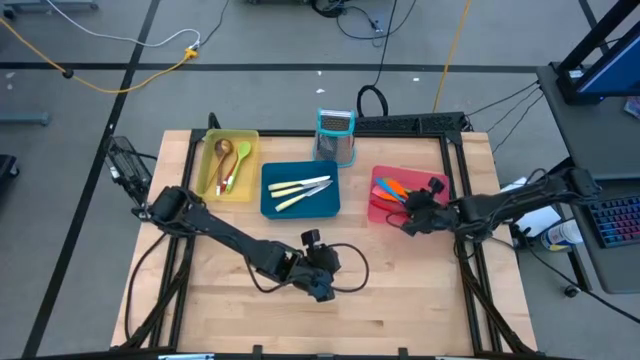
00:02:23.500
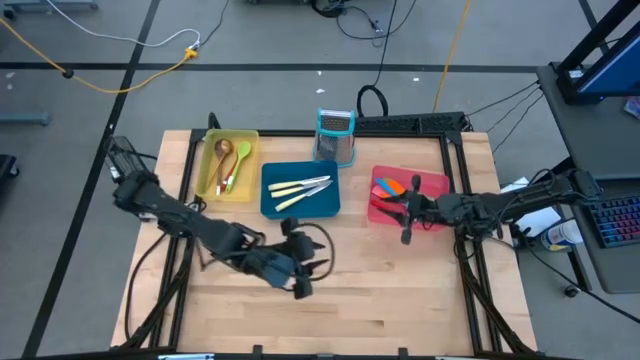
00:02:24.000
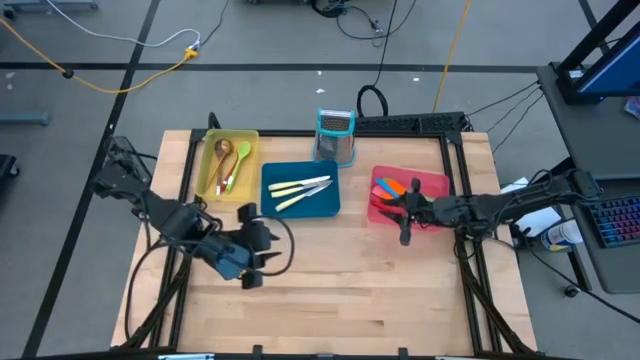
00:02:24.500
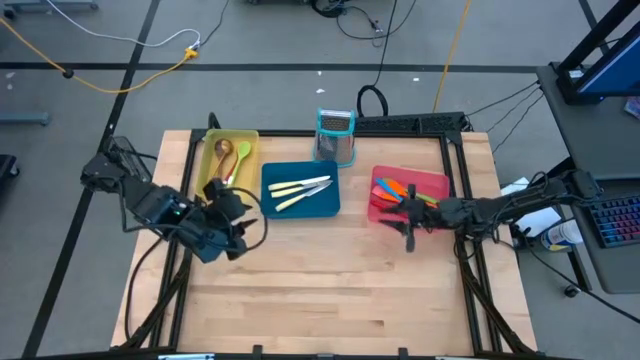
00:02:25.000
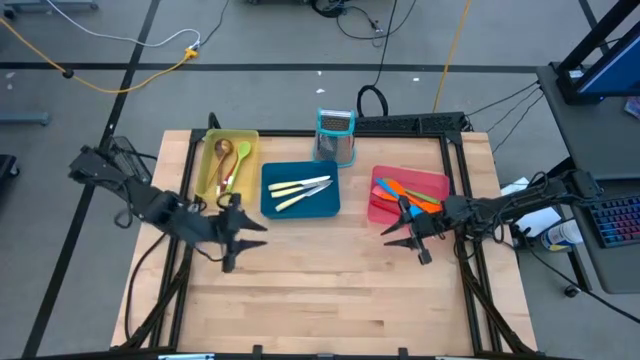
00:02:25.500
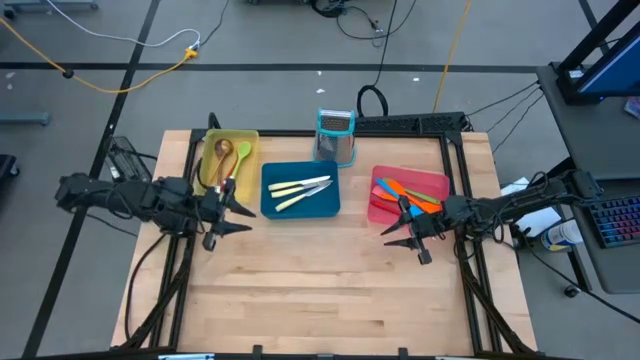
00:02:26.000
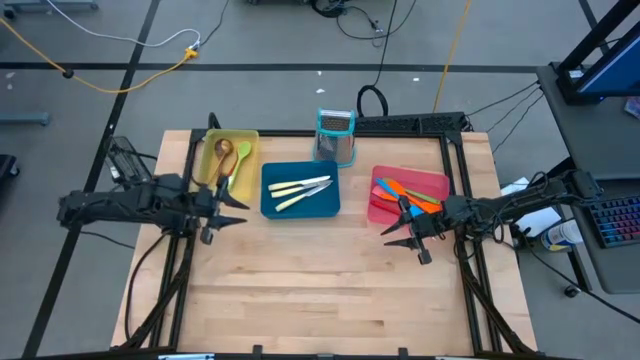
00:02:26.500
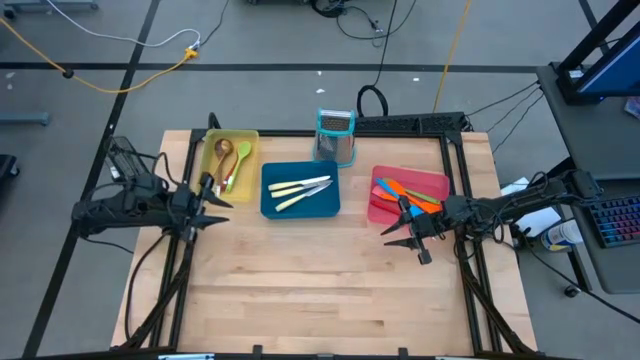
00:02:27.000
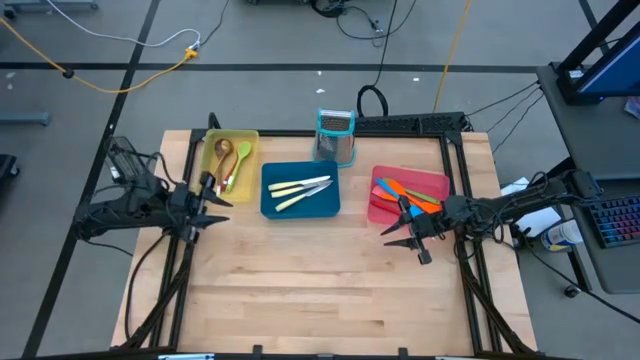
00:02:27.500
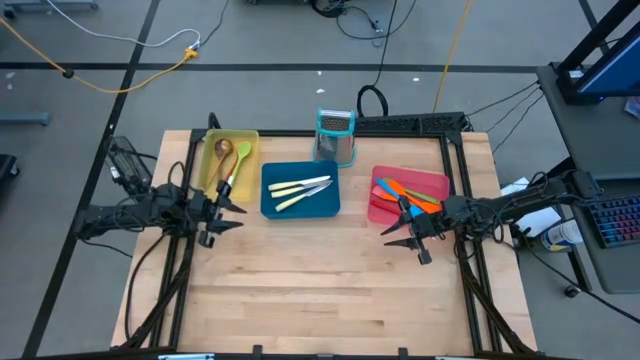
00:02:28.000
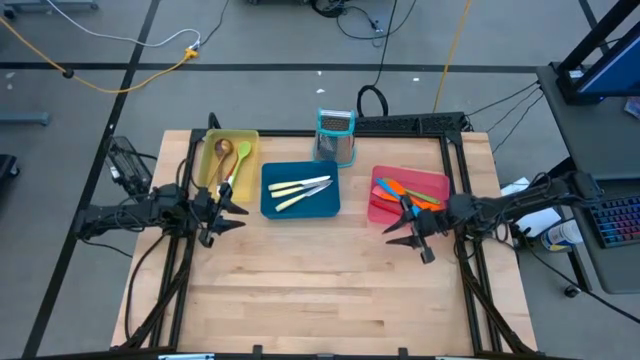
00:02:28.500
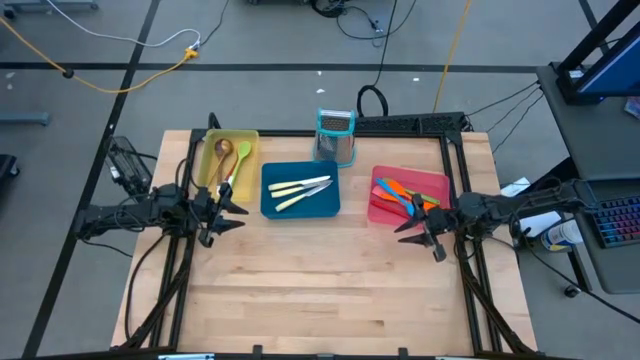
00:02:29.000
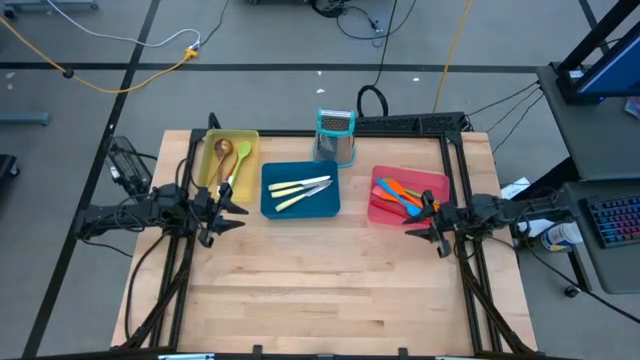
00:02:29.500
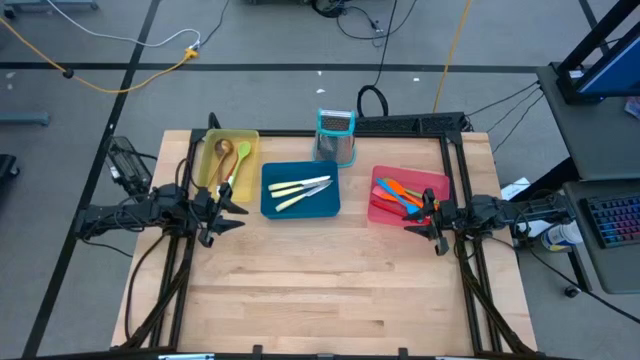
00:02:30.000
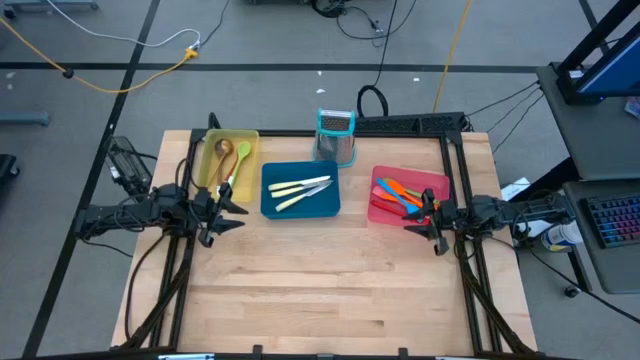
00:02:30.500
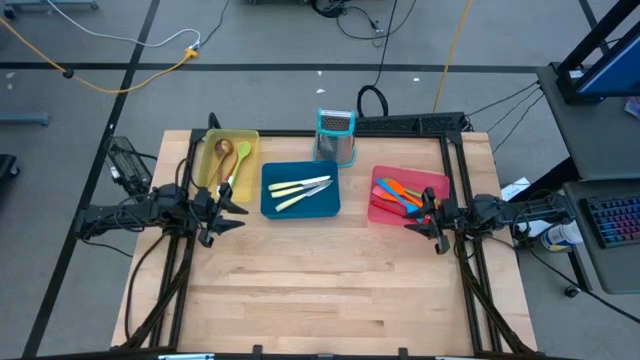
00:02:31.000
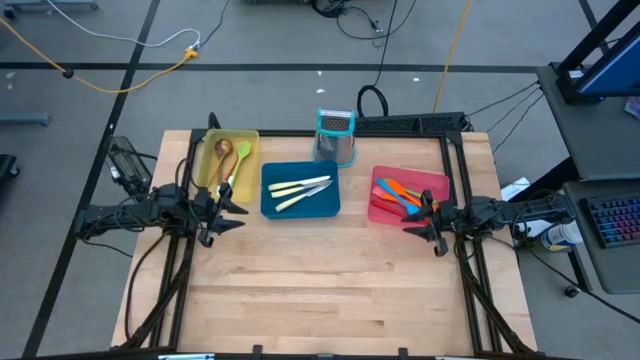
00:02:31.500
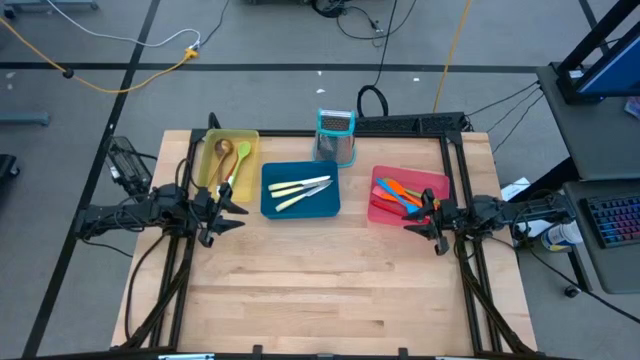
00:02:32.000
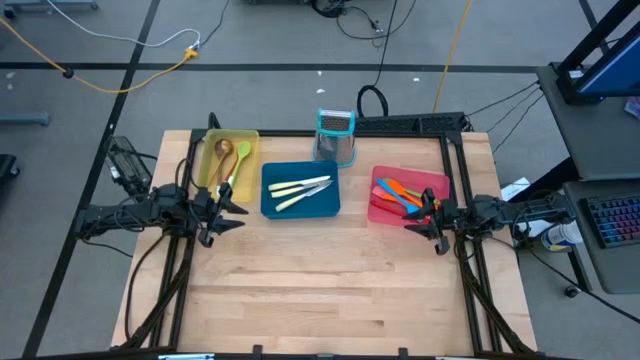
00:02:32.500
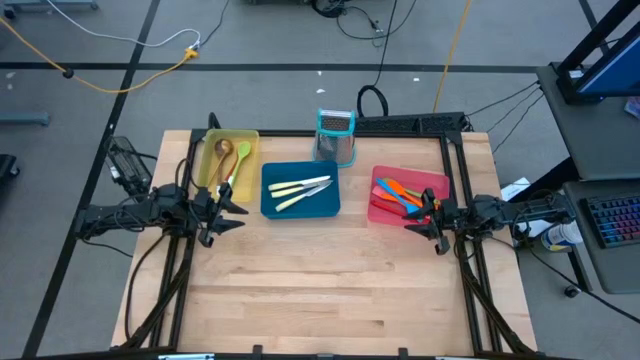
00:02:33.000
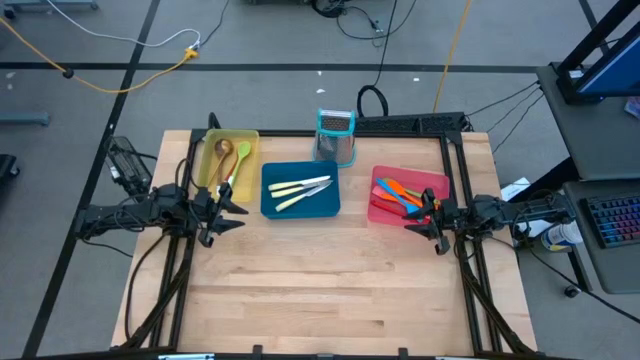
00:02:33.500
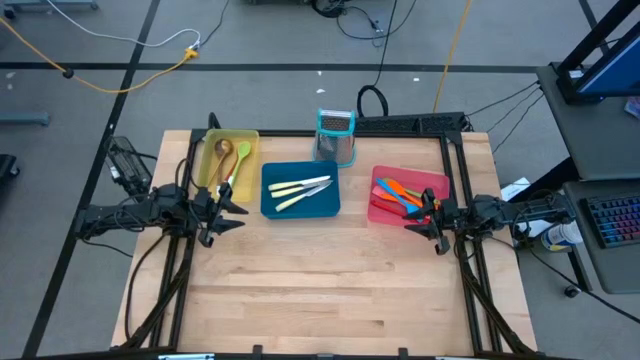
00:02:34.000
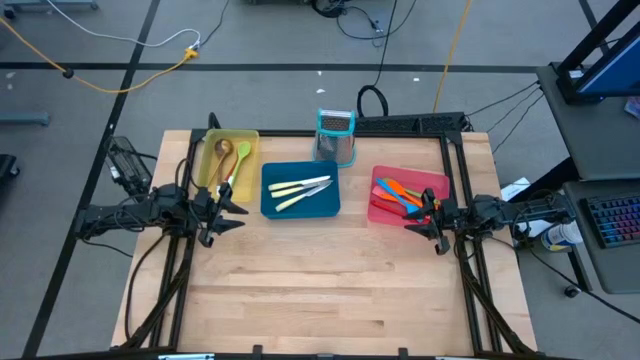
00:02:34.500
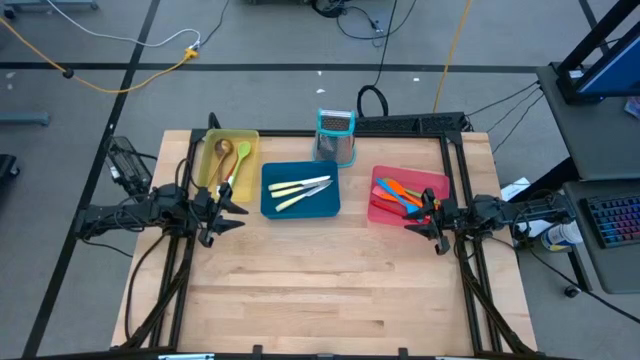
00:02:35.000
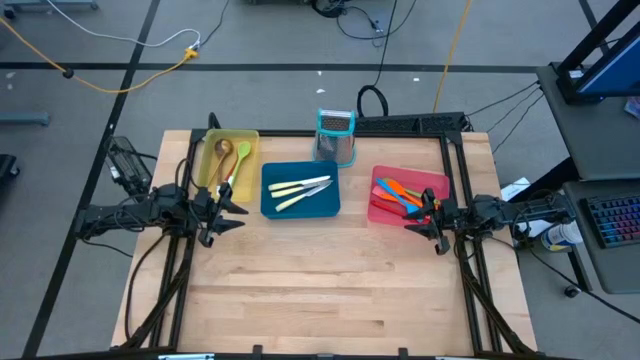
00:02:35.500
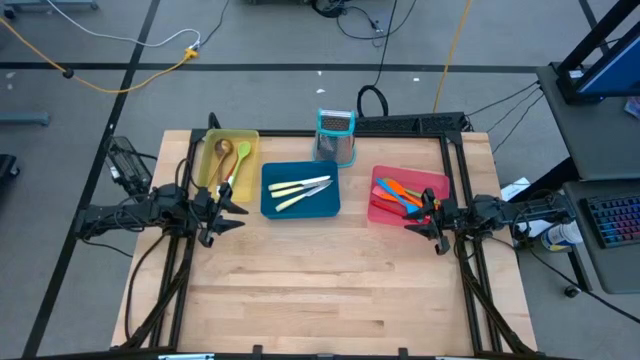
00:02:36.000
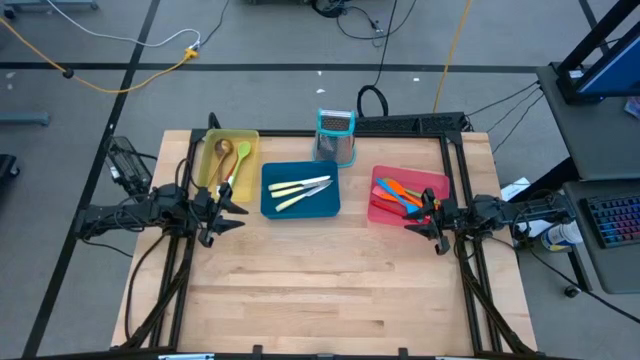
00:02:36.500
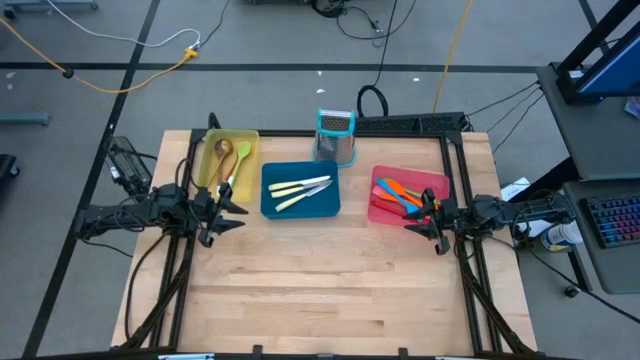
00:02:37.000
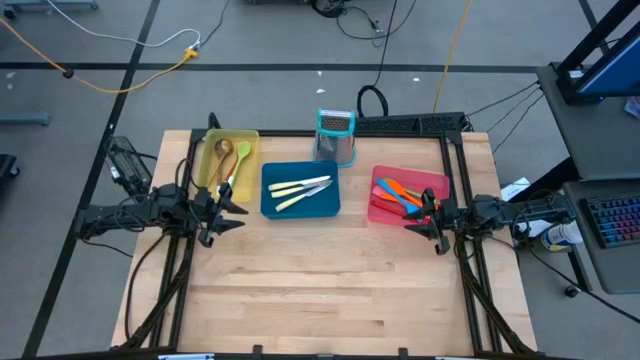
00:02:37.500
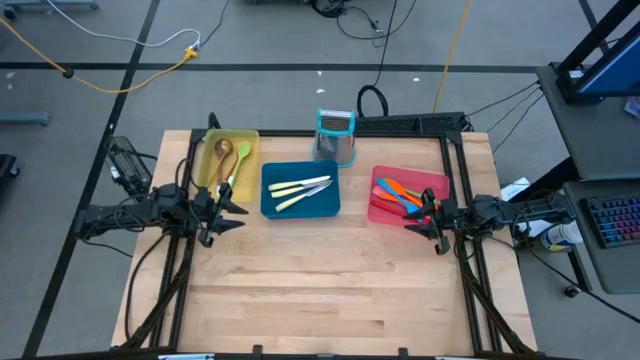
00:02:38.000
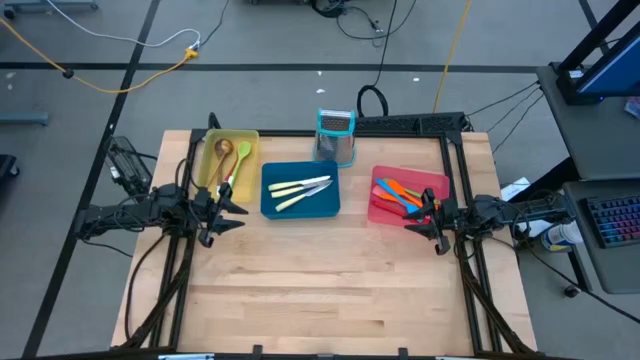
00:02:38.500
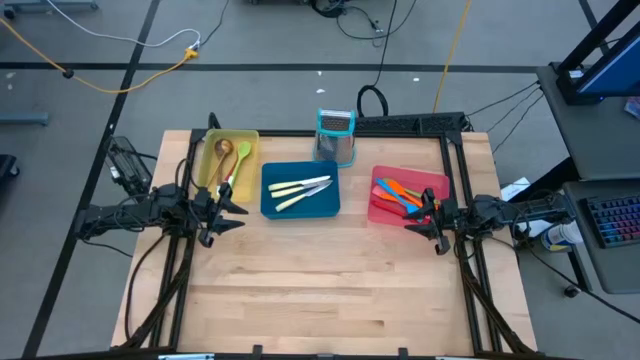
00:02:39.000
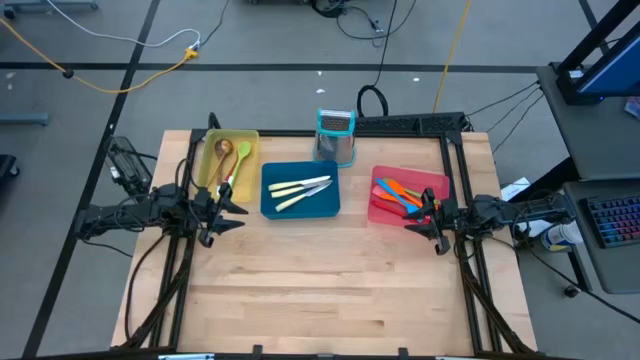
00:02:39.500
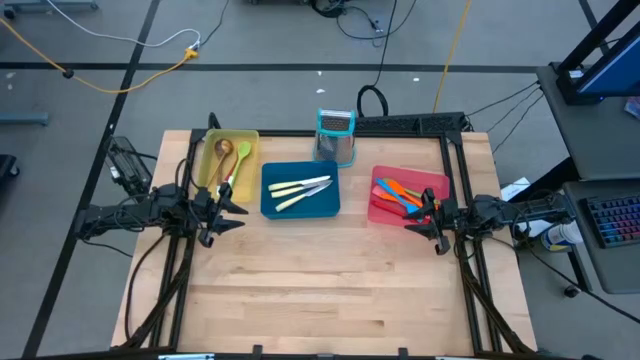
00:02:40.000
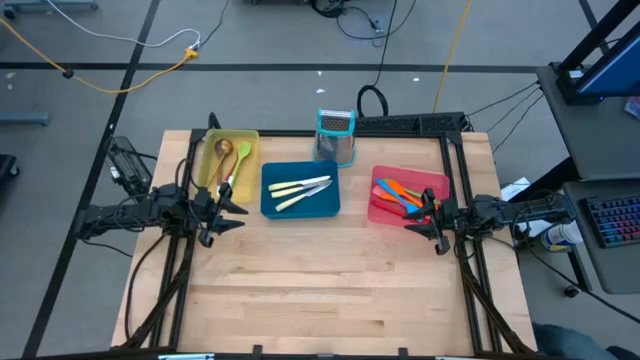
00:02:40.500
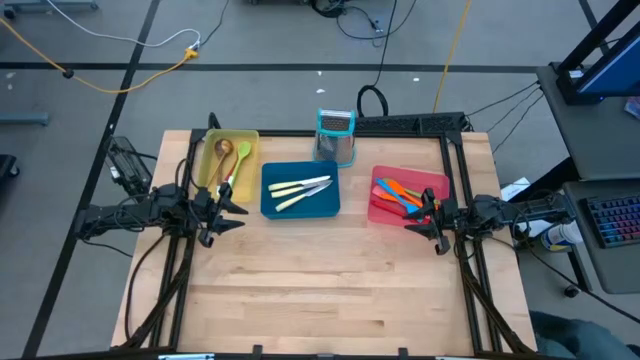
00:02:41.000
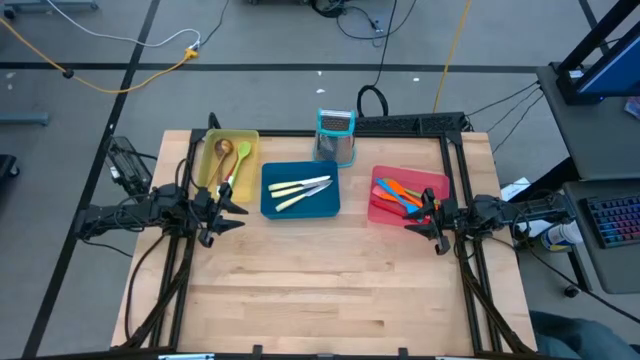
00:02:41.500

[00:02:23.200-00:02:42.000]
Task: Pick & Place Kitchen Items
Return to Home Position

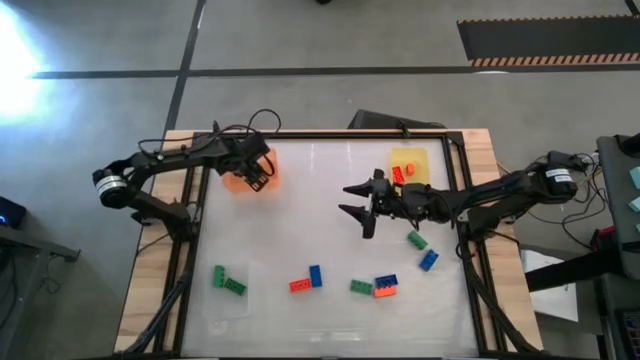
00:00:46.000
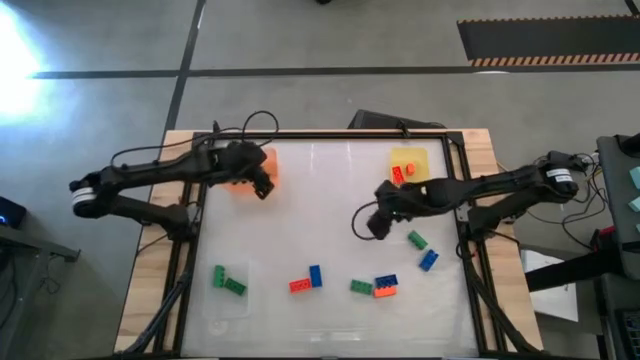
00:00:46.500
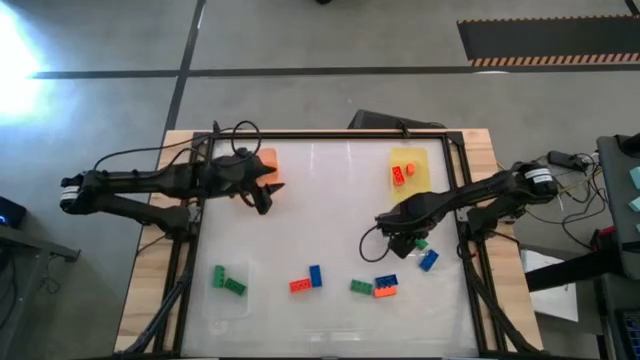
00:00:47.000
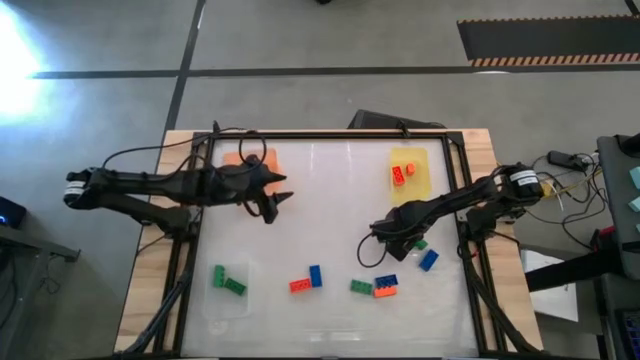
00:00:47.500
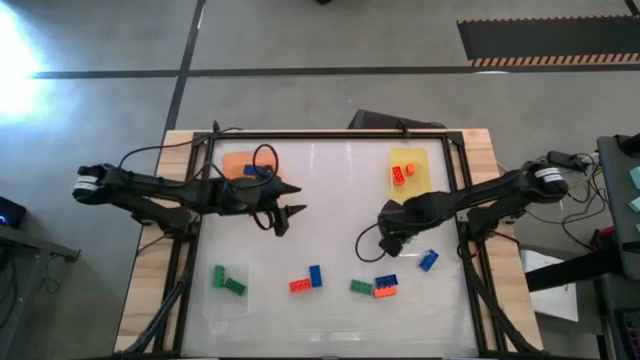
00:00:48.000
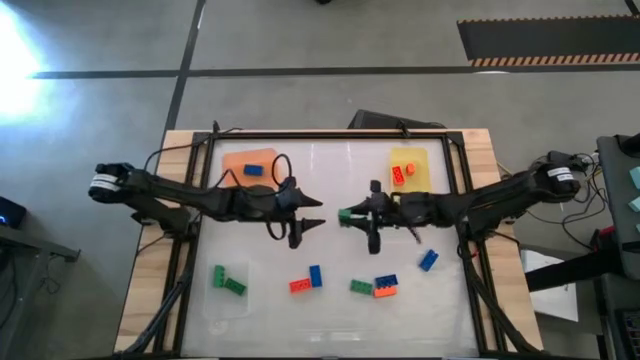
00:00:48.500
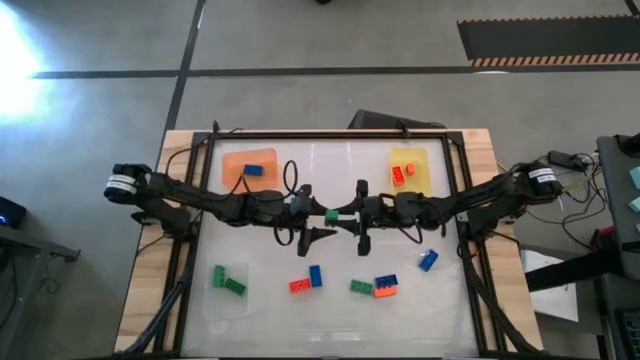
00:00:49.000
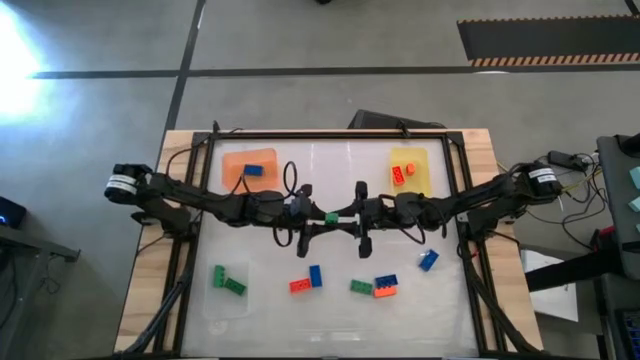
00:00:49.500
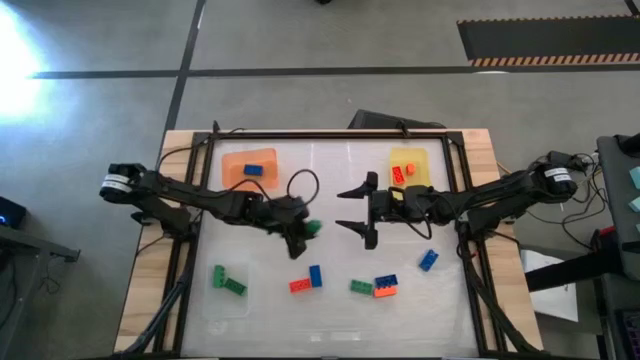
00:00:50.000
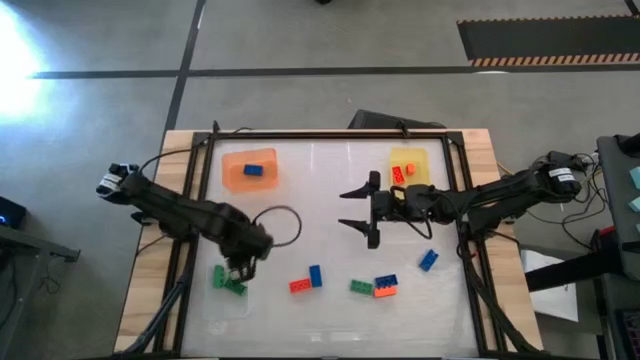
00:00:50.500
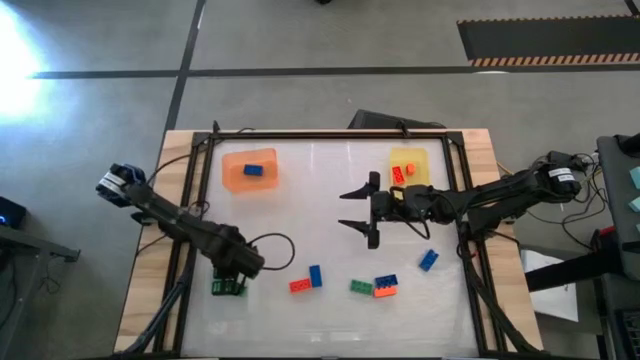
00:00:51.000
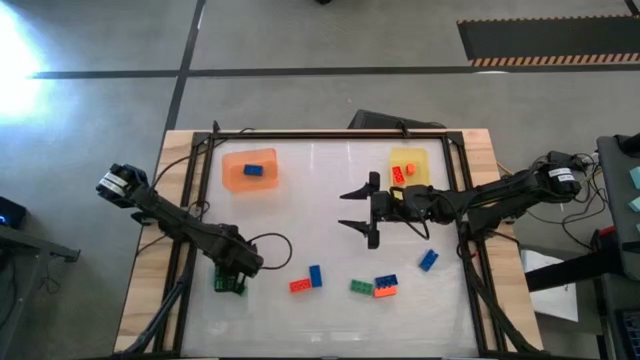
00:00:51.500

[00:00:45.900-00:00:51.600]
Task: Sort & place blocks by color
Put the green game piece into the transparent bin
